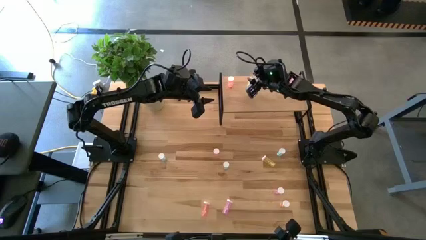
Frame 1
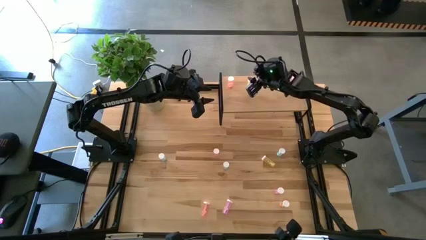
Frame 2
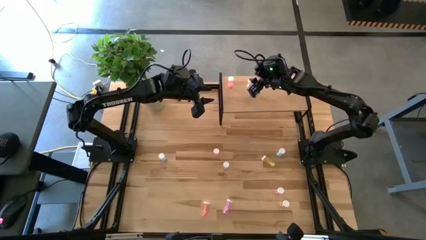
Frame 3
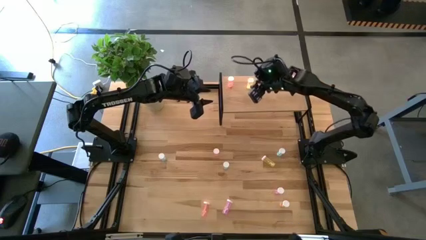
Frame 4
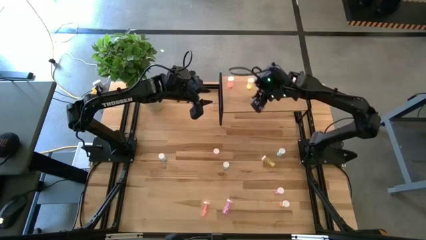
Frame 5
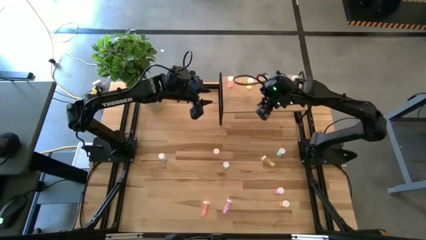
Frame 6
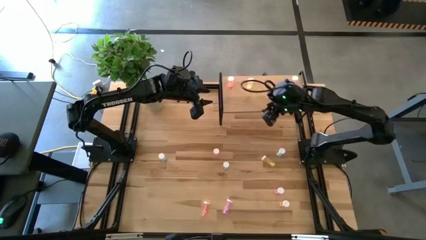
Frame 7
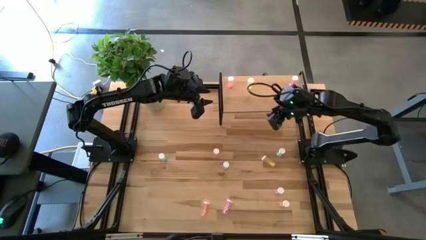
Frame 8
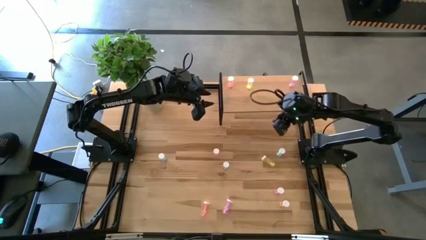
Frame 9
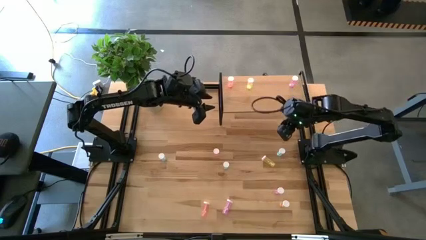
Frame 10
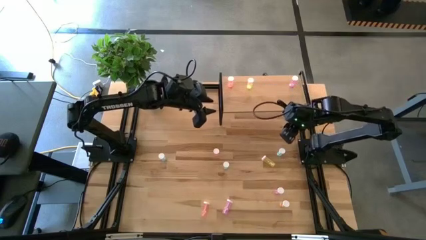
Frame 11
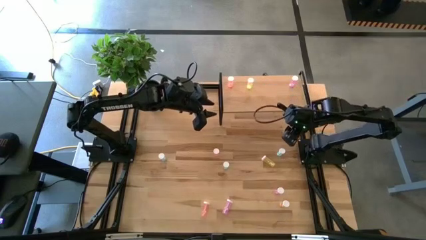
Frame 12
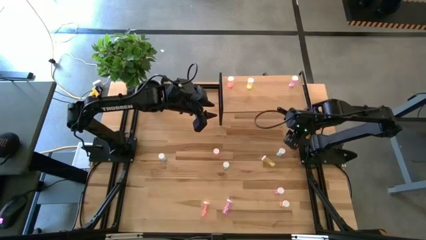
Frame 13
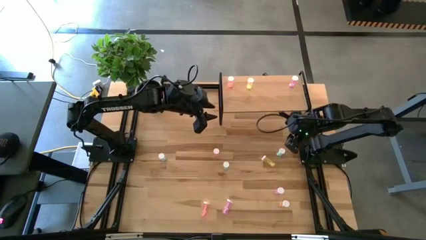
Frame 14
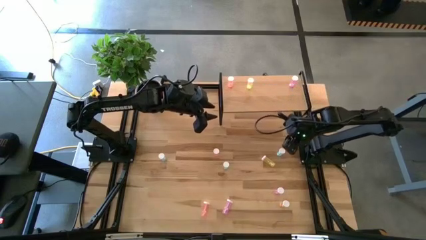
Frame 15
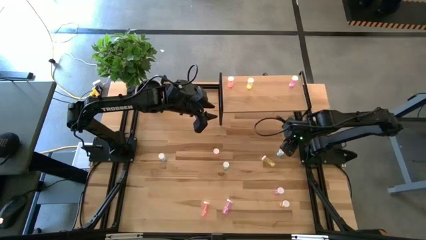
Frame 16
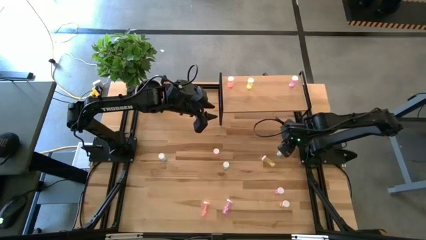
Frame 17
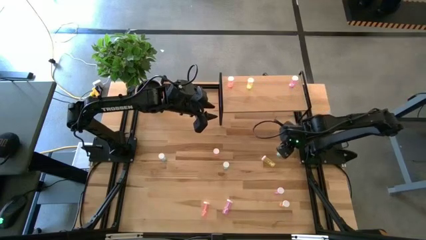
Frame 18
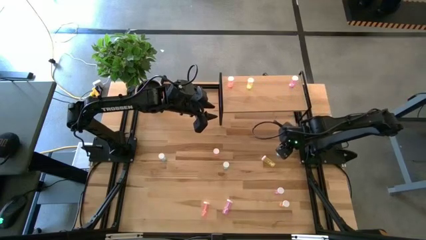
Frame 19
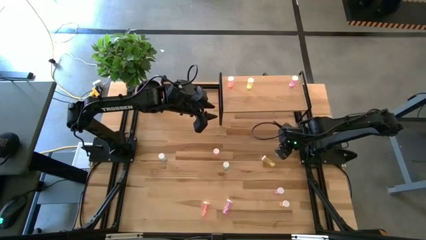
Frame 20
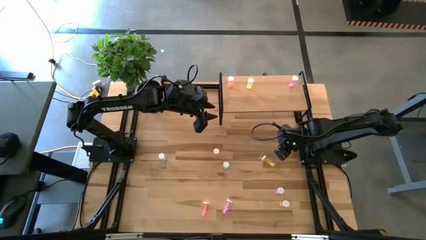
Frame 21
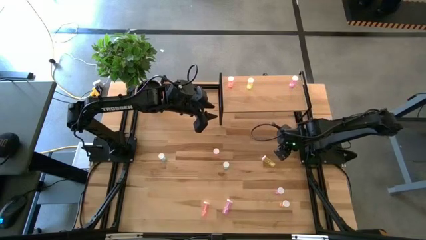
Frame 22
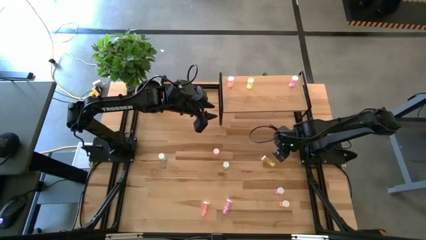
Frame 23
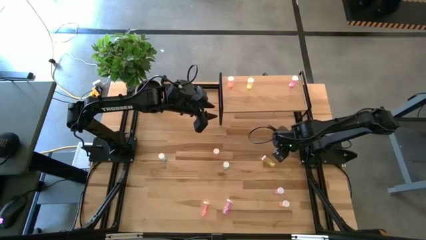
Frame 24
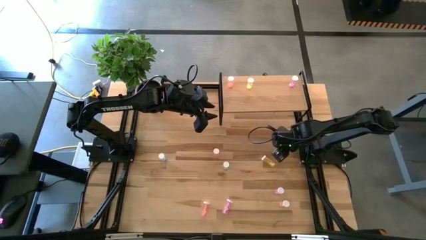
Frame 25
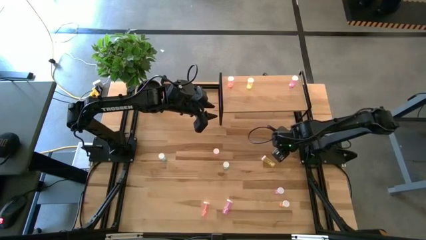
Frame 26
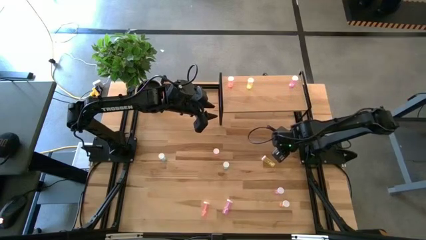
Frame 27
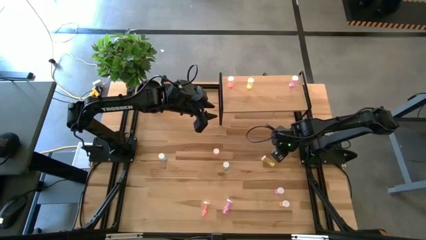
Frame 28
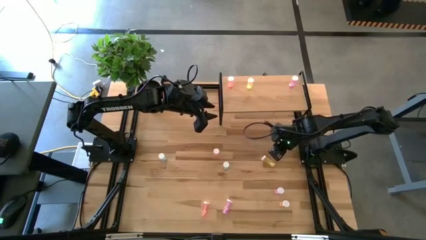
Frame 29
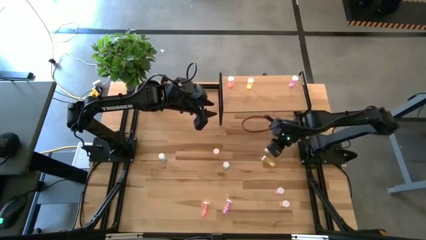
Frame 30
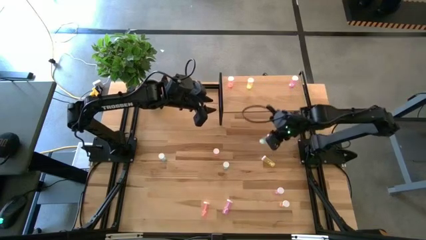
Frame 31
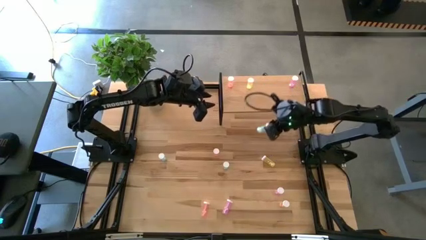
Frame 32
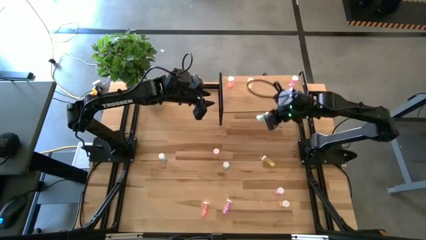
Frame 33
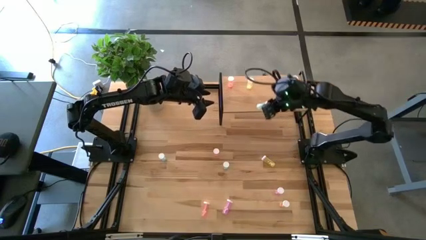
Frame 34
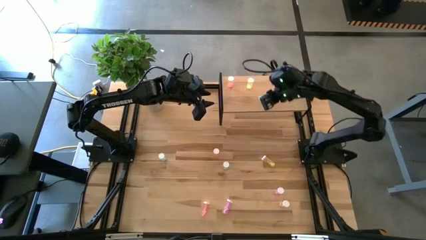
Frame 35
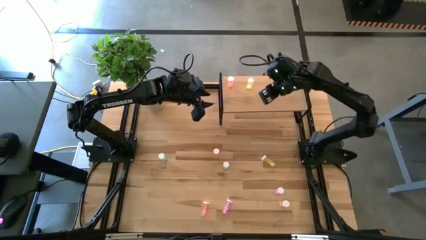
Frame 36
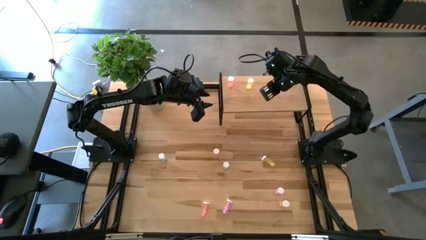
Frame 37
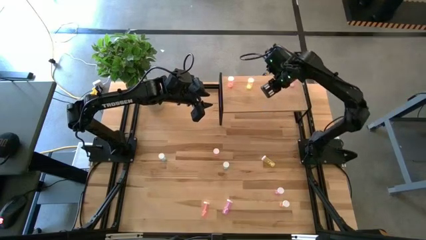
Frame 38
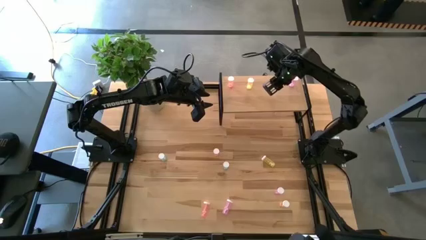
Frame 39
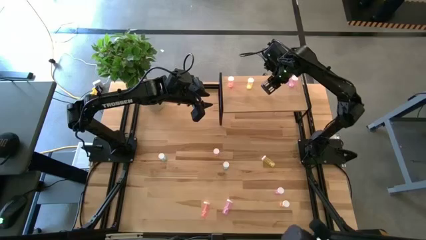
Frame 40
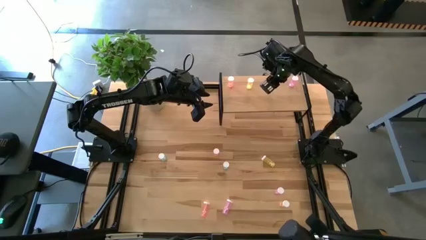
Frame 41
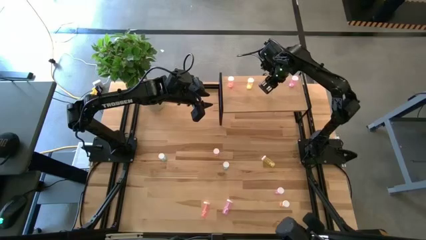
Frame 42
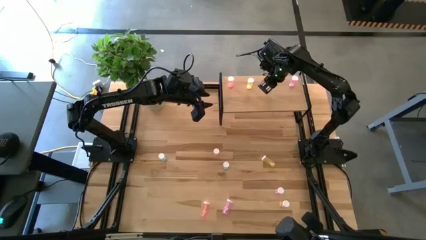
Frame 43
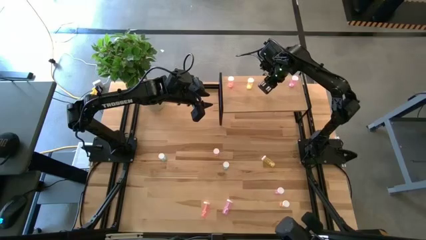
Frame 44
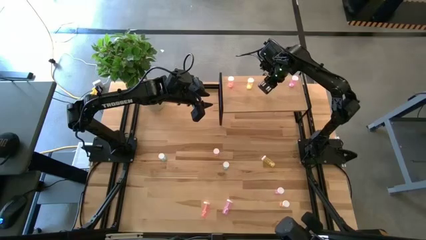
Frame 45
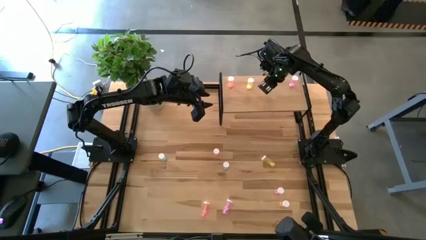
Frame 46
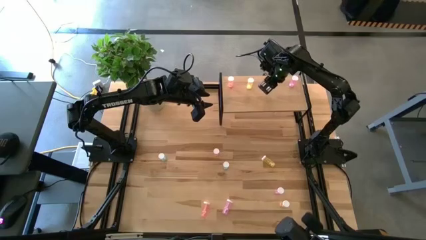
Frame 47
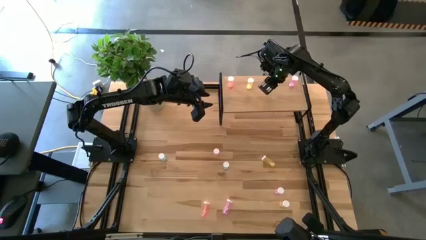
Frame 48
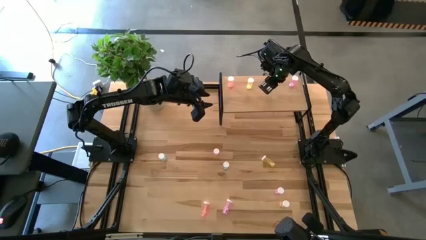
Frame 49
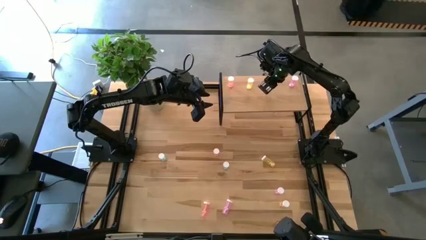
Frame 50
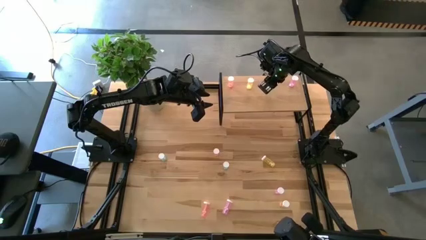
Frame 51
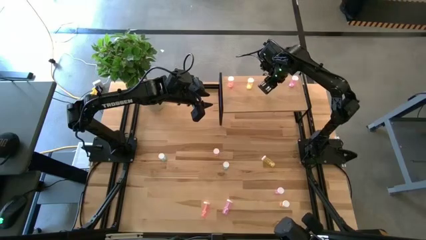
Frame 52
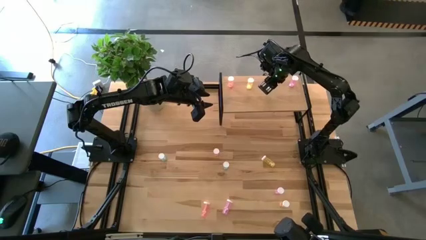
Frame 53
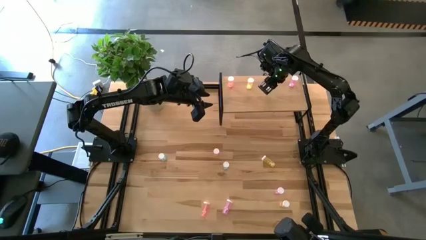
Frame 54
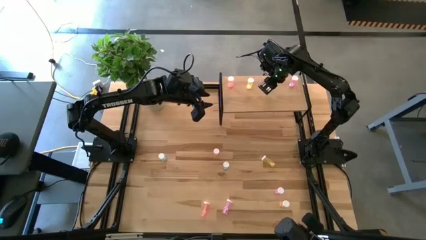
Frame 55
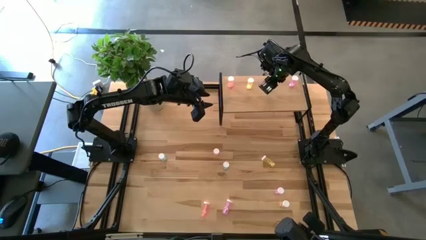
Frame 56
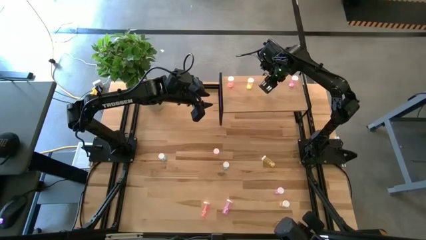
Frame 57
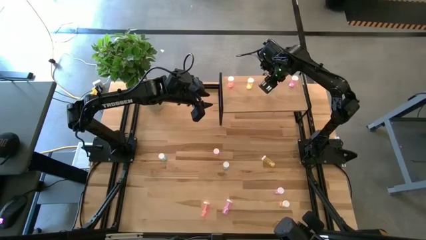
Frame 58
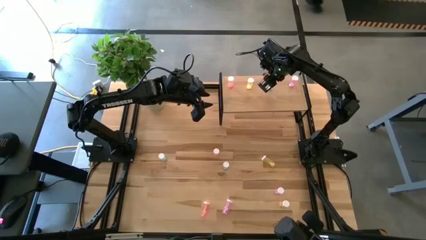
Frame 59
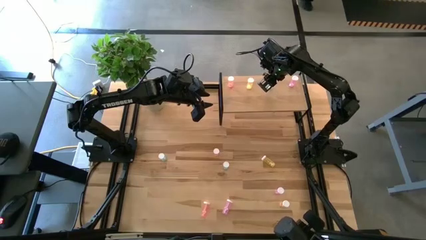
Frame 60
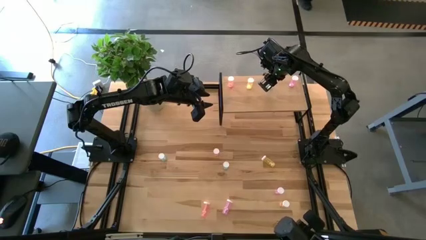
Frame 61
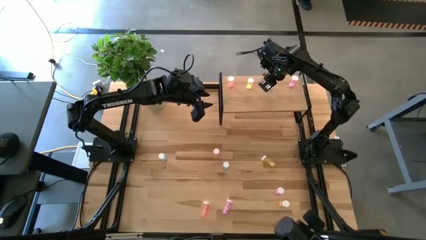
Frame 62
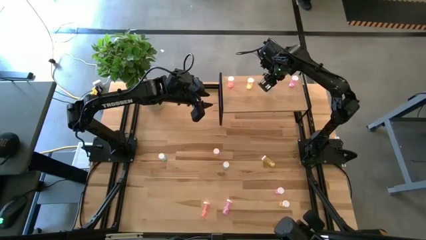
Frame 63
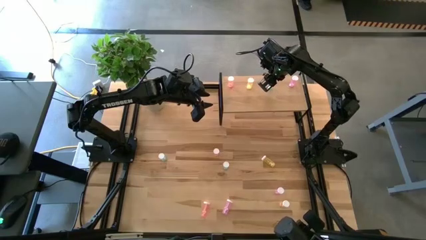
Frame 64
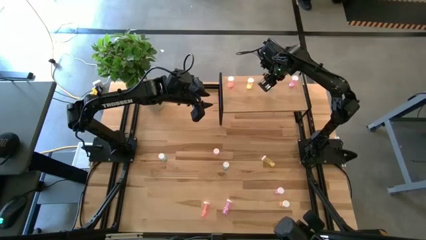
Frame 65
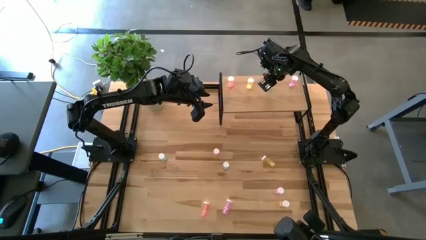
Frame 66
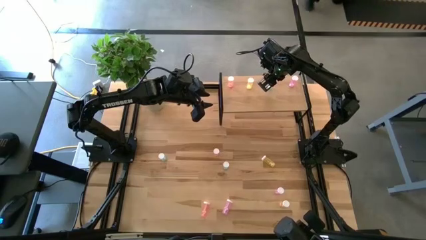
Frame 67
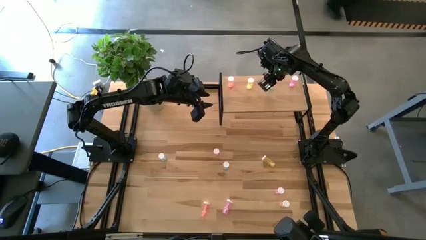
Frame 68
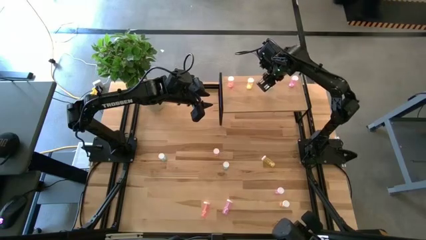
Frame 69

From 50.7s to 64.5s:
Task: Pick and place medicine bottles onto shelf by color
Put the top right blue pill bottle on the shelf

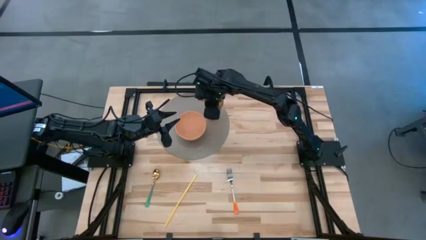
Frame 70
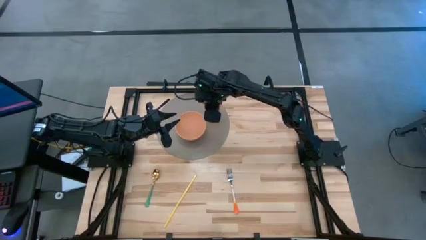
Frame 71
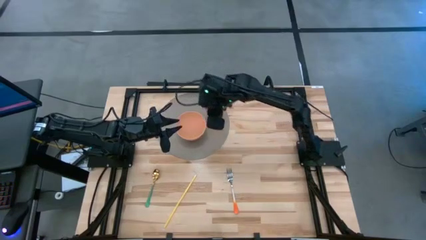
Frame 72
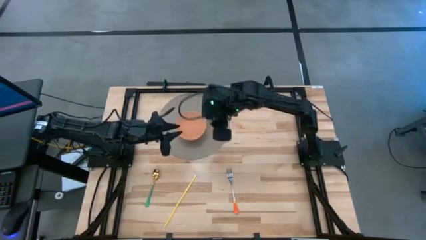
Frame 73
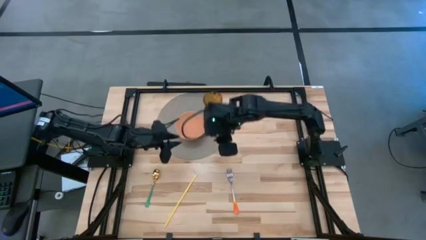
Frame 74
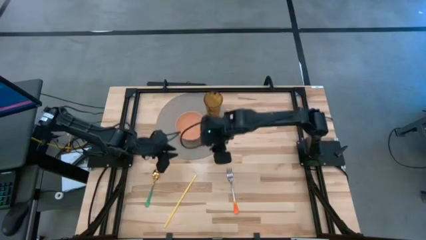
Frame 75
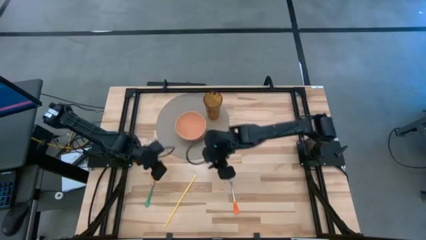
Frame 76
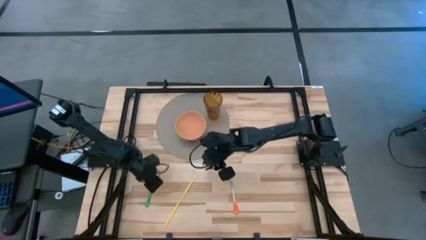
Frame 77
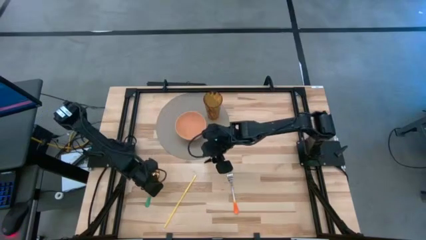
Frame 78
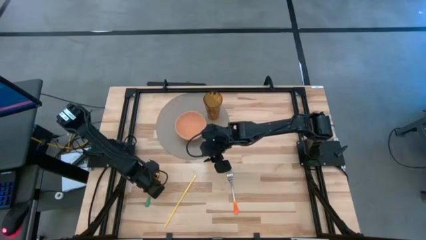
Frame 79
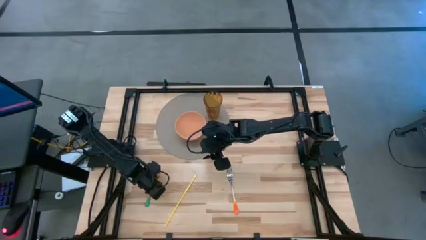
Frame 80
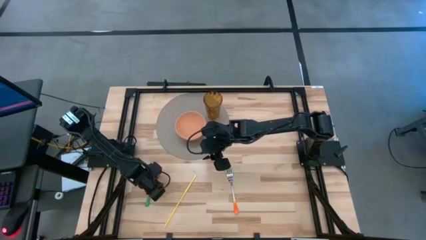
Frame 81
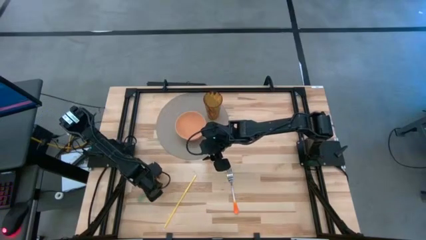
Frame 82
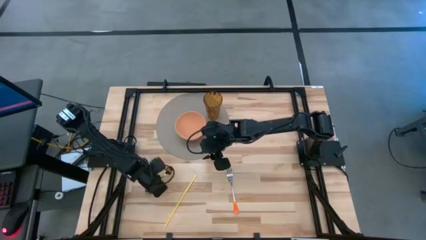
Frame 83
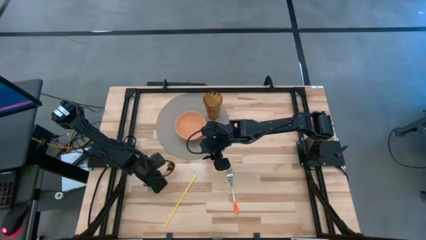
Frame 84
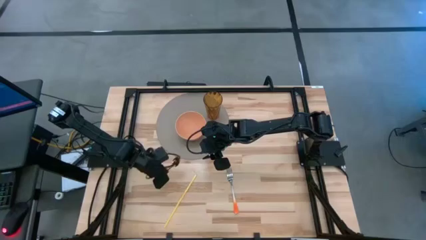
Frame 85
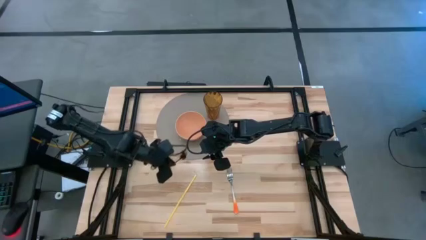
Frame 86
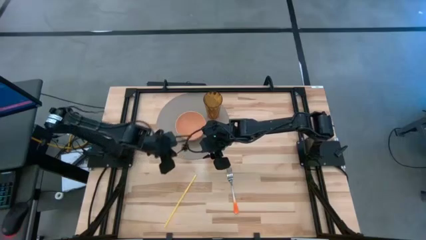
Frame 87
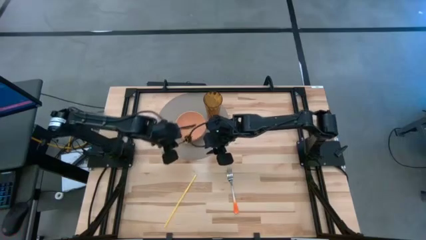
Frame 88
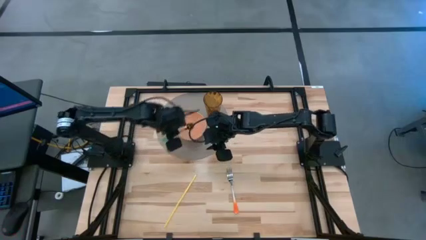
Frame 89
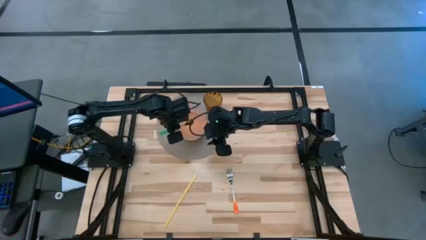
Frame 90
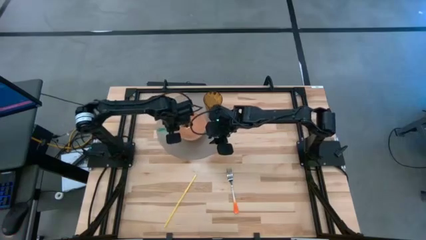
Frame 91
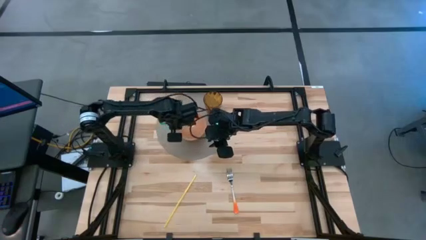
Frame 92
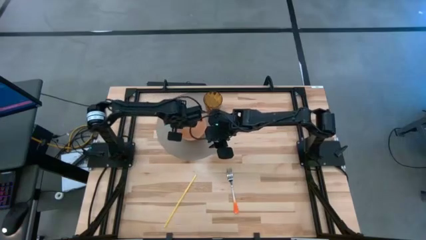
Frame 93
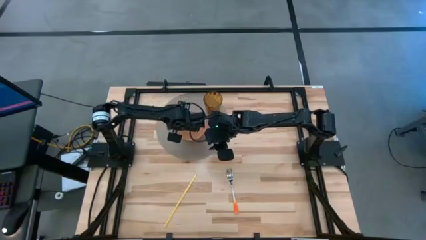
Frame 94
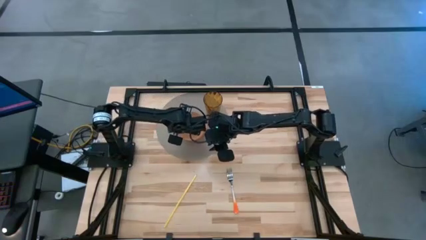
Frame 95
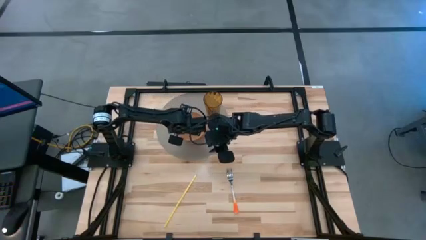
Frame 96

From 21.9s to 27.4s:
Task: Pick & Place Utensil
Put the green spoon into the orange bowl on the gray mat
